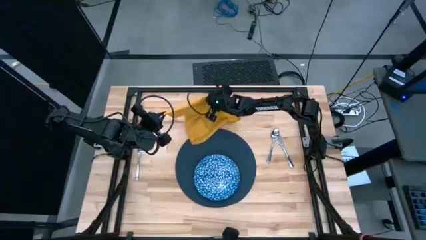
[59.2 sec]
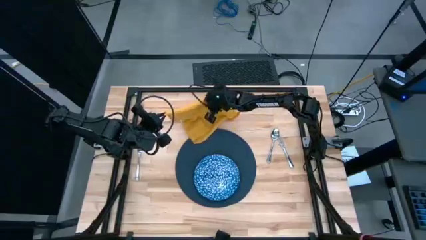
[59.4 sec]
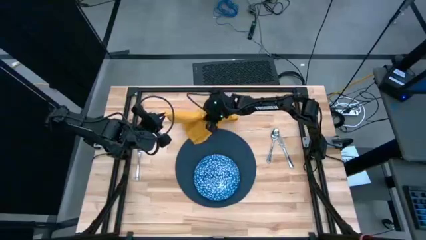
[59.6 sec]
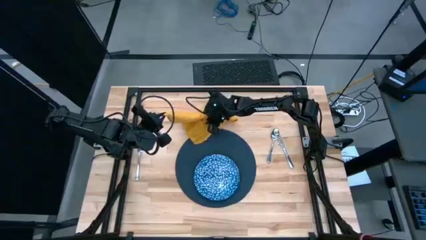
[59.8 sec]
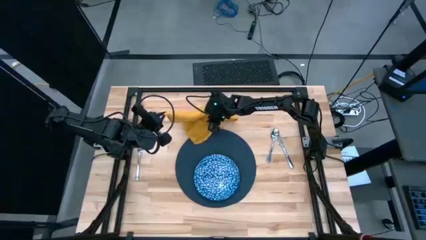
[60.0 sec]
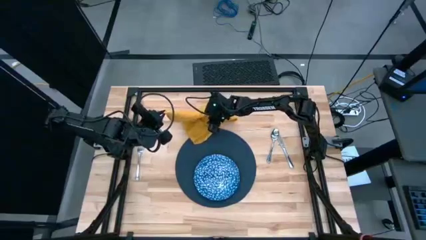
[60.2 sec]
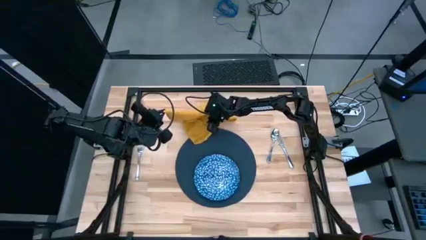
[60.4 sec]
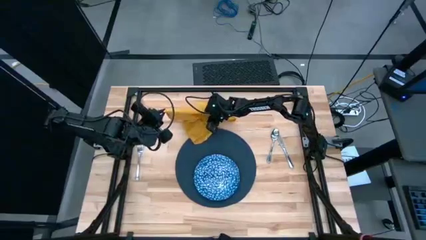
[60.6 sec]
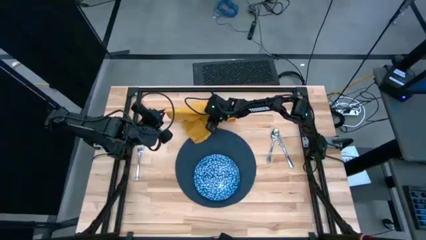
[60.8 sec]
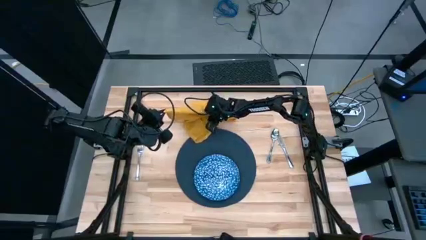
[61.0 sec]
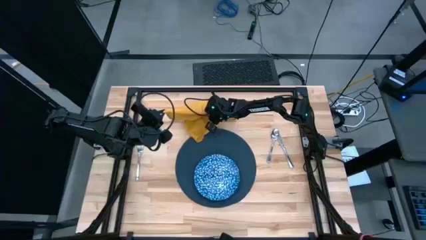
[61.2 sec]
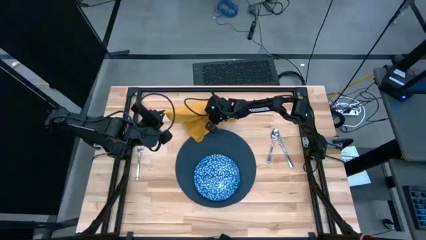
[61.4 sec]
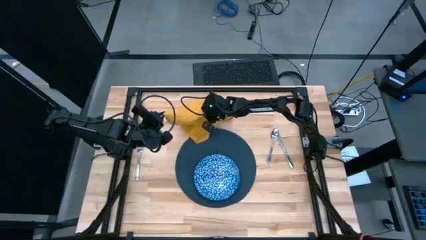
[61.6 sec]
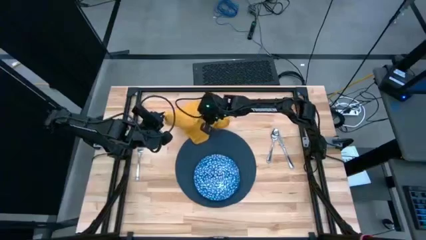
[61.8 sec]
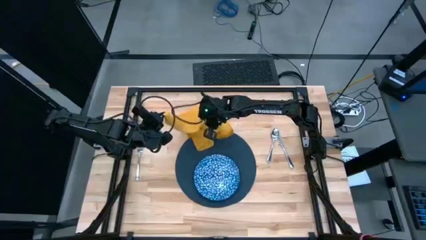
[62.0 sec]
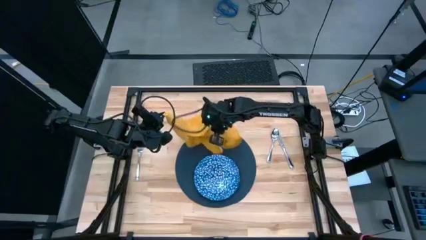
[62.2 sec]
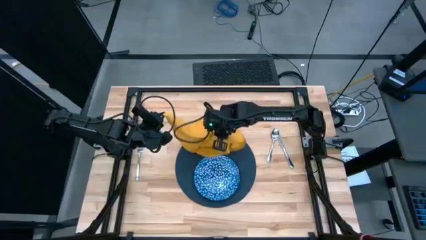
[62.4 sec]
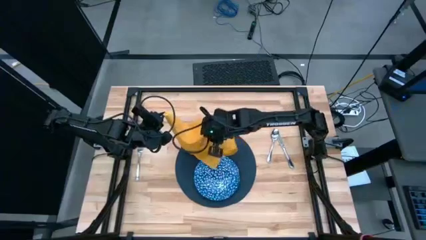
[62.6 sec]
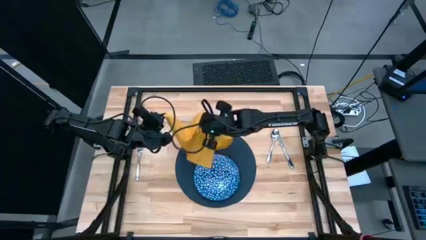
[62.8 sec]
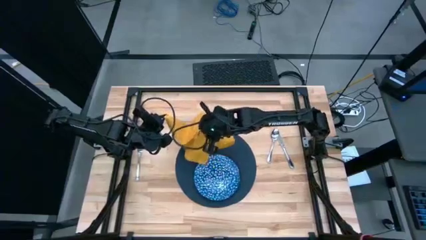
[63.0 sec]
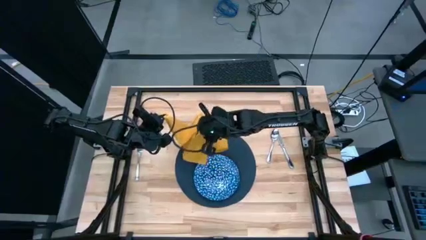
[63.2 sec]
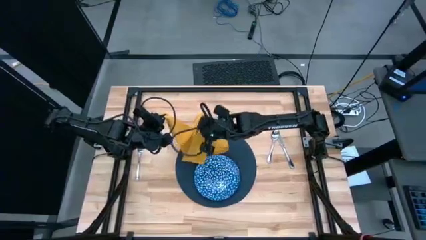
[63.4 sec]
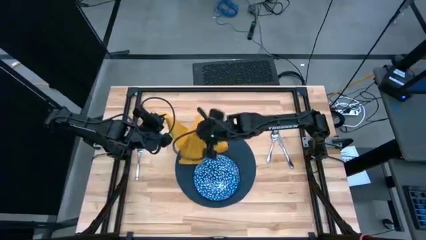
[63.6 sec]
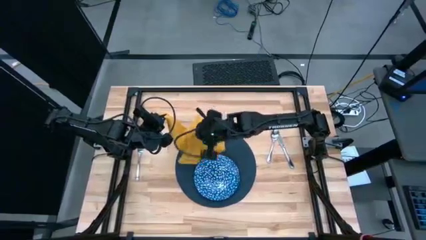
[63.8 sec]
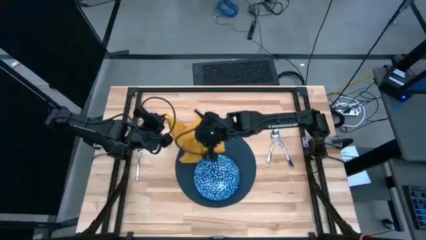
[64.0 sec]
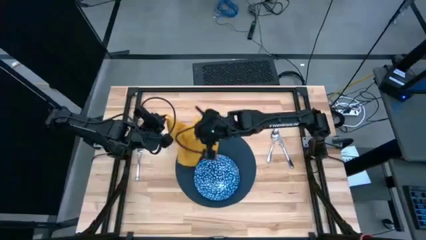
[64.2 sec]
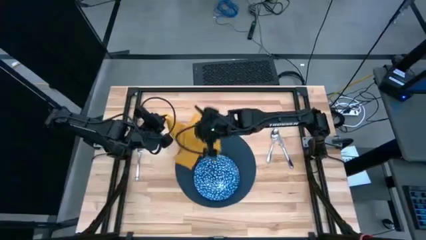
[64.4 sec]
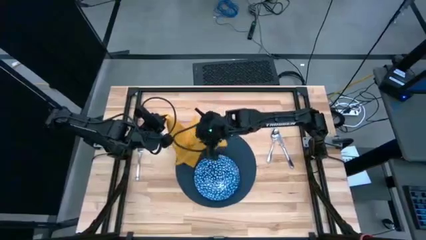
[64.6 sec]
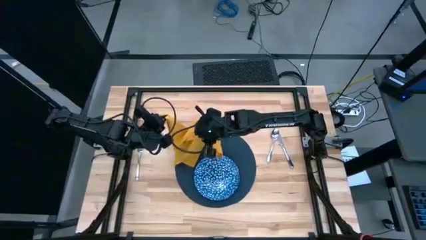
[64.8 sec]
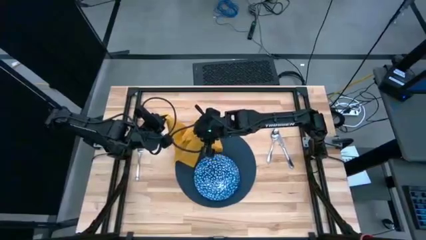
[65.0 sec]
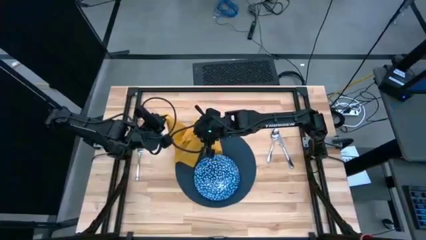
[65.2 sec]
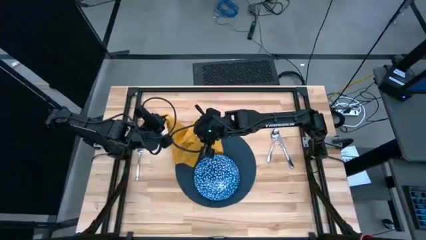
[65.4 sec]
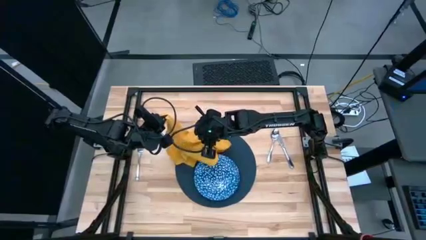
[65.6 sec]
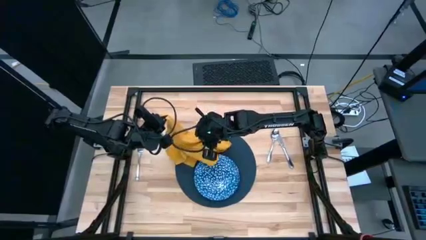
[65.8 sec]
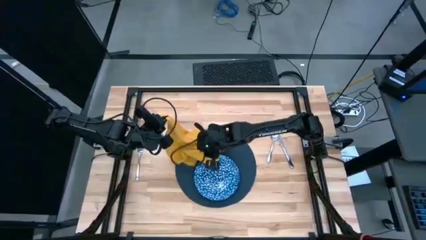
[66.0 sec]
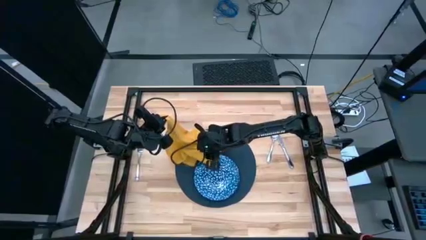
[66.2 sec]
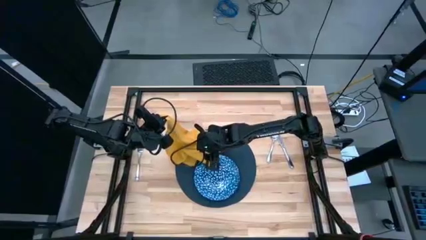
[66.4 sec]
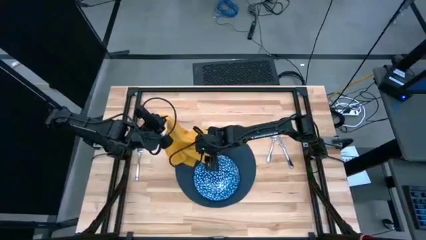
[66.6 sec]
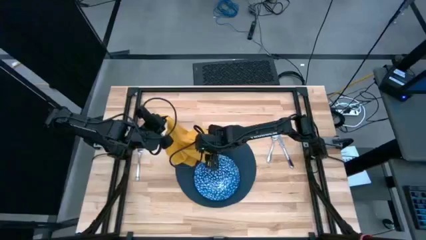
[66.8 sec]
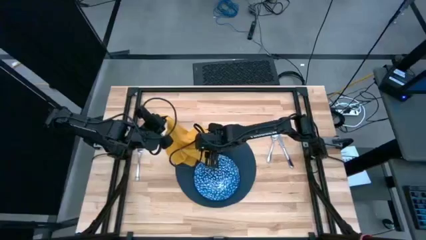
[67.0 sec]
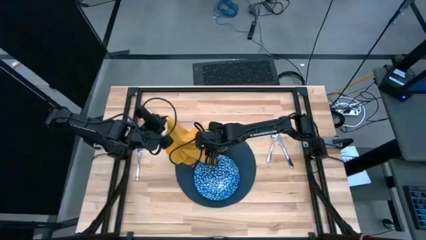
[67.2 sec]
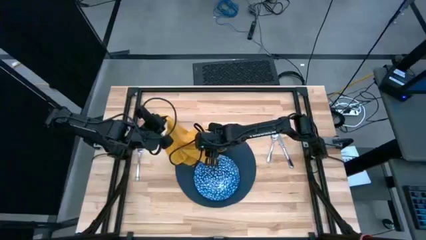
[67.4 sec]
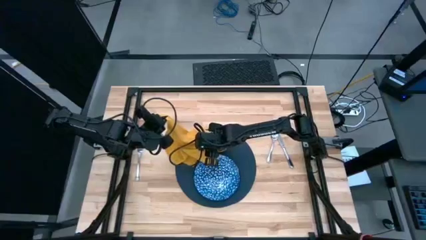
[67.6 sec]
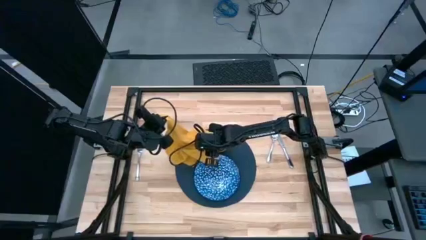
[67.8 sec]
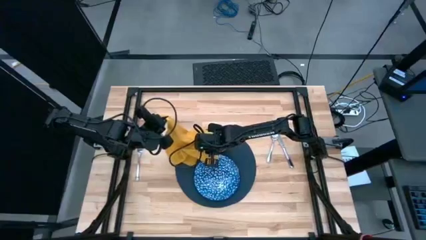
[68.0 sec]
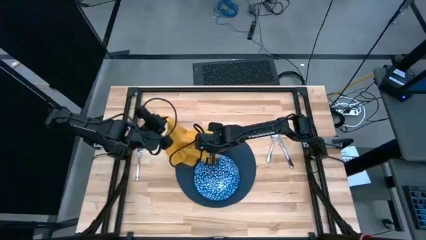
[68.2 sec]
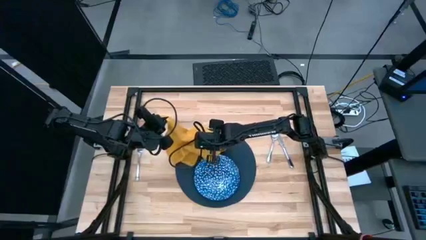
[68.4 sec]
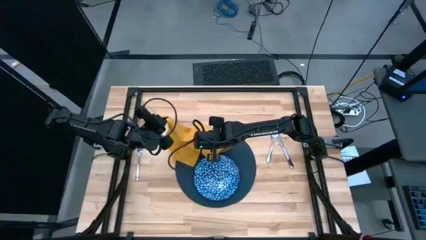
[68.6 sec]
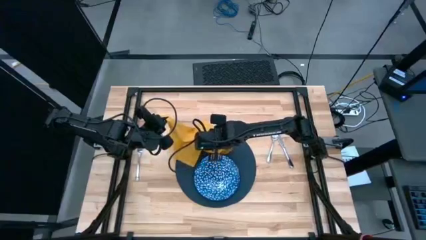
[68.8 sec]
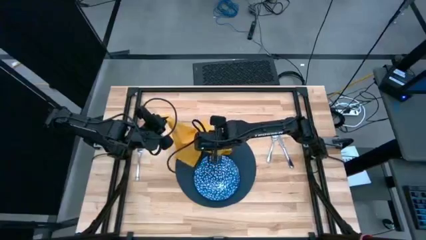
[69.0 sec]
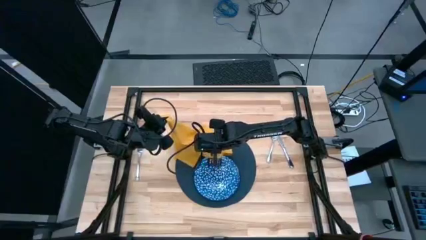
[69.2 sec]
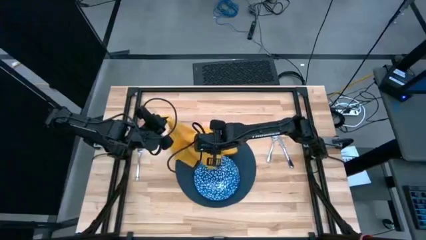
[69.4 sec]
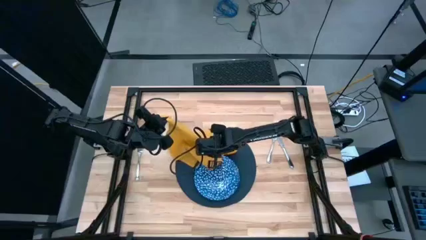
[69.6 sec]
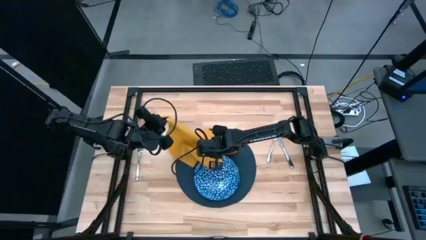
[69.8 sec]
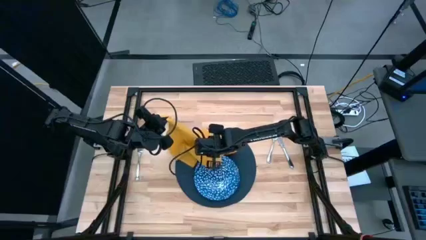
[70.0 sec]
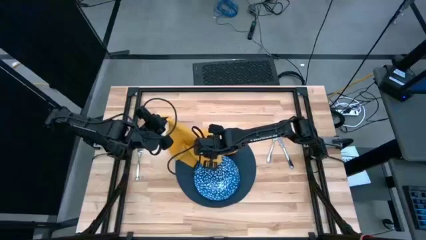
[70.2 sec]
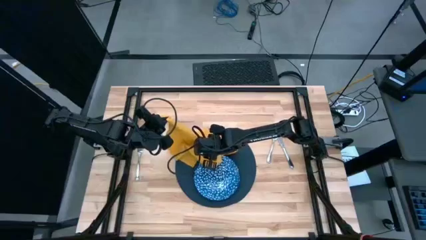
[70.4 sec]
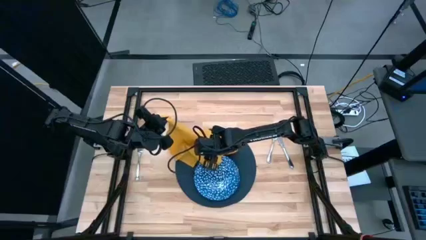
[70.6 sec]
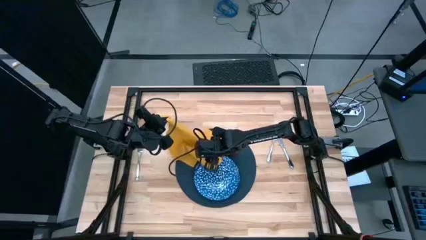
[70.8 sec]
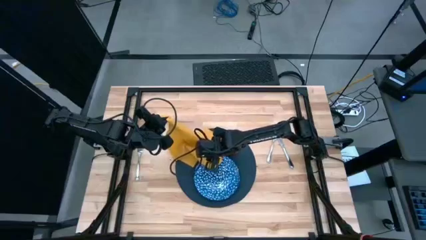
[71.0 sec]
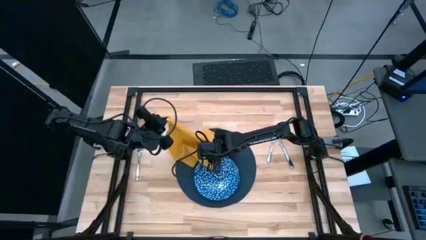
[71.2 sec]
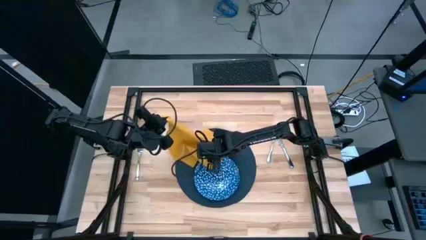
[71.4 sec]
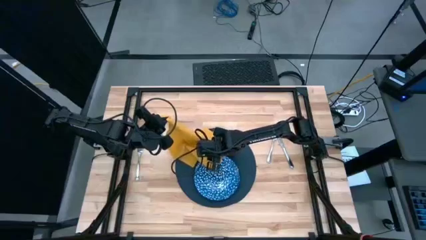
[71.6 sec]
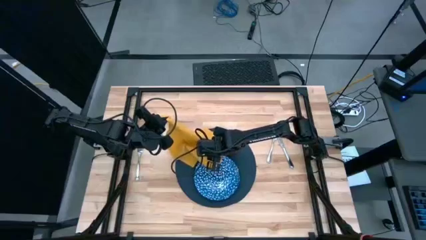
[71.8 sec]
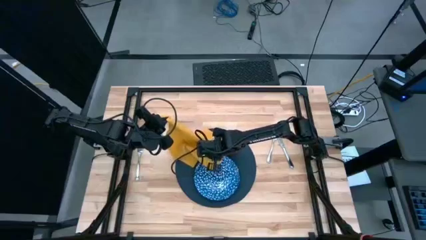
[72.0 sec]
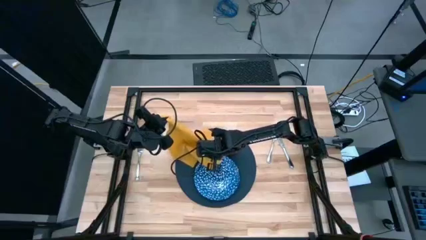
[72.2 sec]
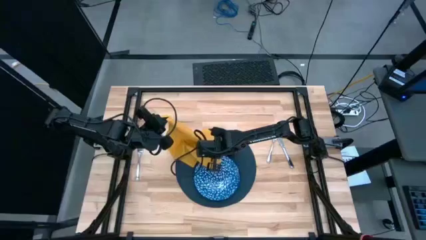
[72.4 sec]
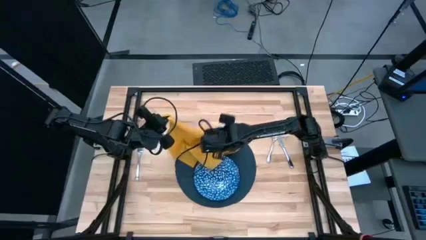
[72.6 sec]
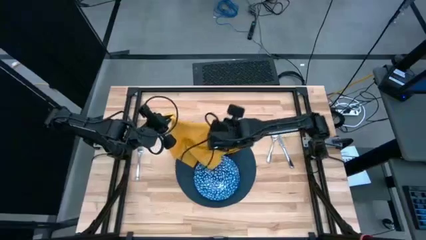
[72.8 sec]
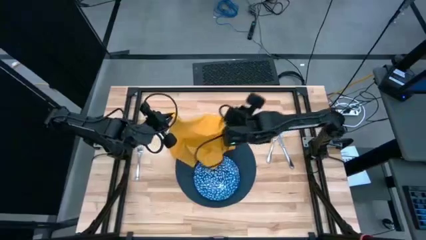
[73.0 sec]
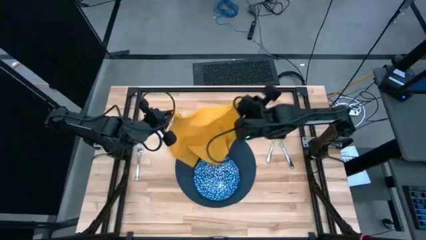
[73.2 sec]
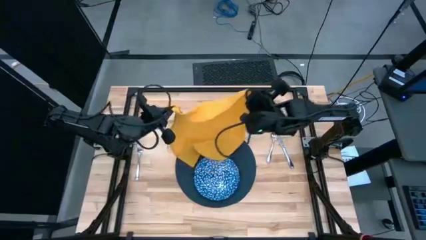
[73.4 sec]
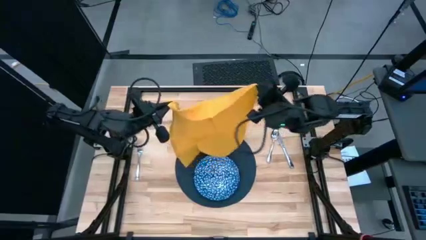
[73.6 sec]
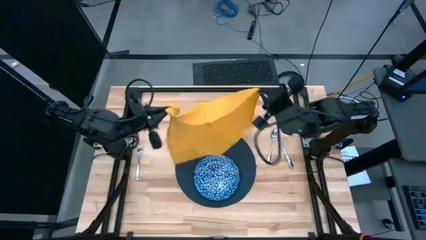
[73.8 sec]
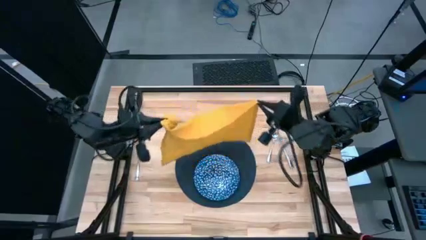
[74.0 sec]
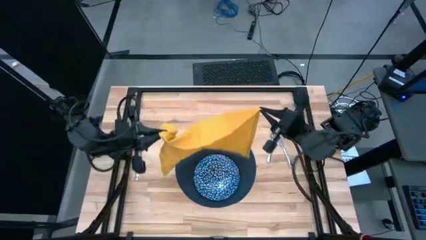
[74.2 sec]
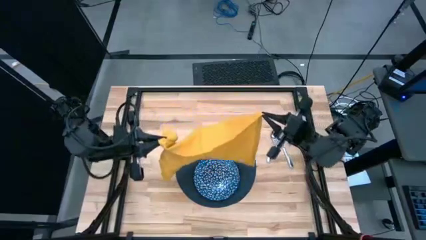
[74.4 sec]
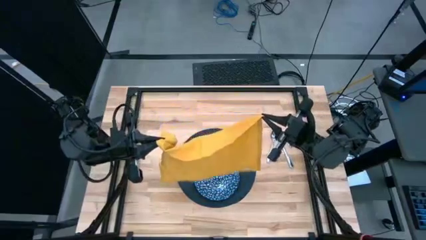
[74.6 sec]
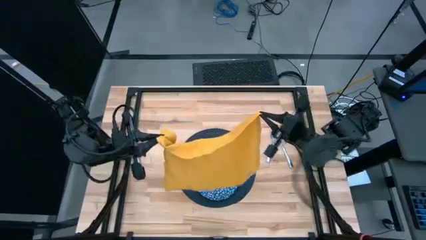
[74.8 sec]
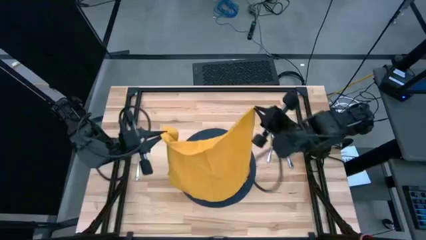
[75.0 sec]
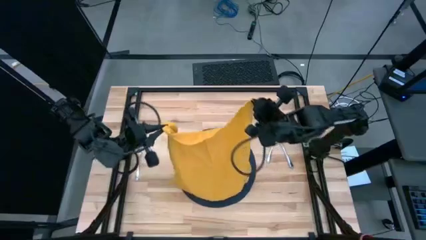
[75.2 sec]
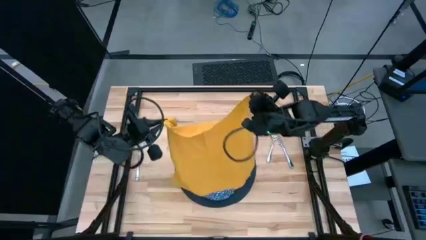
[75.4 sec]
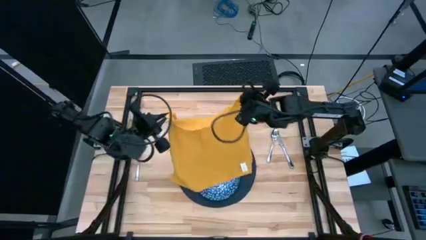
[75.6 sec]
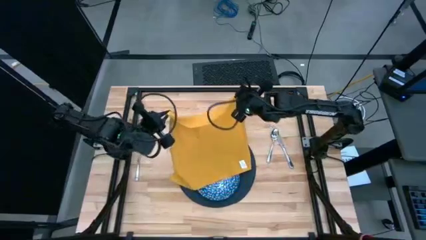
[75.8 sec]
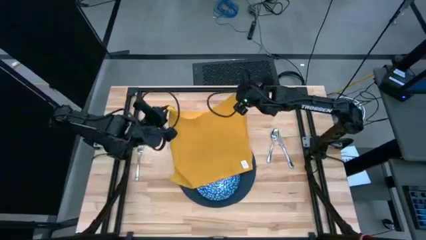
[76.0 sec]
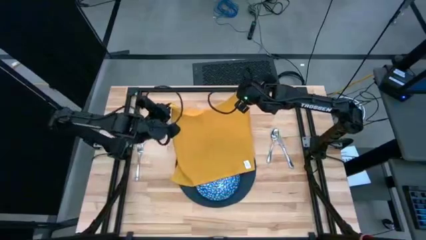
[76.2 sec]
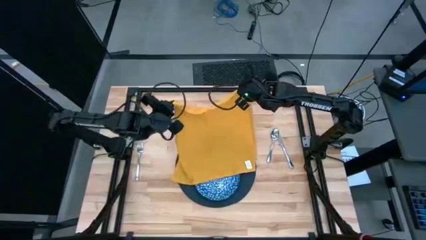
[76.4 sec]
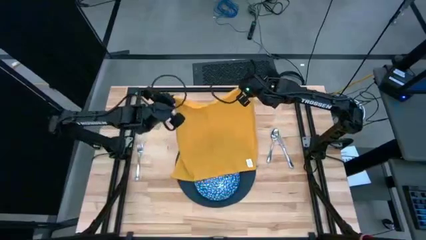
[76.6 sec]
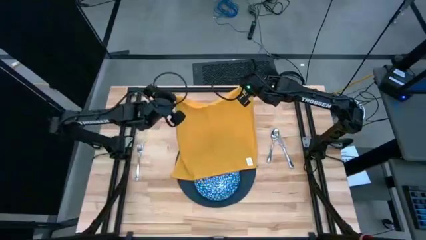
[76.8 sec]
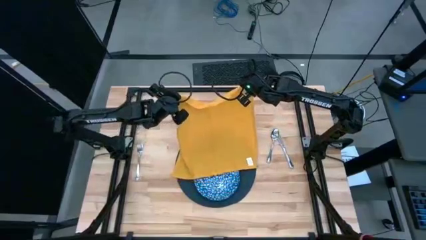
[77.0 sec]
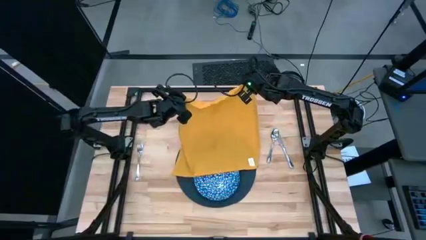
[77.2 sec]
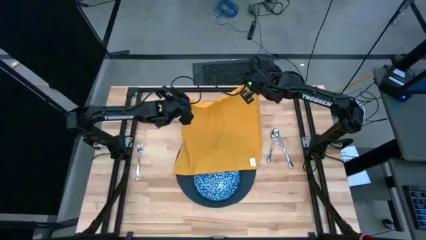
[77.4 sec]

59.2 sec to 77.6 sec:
Task: Set table place
Fold the yellow table napkin
